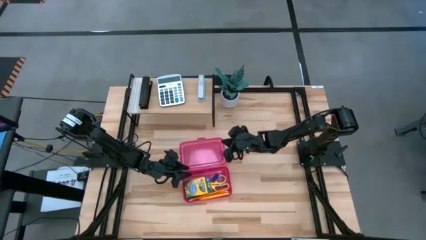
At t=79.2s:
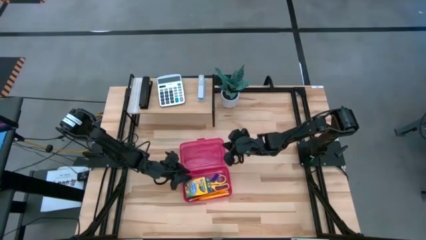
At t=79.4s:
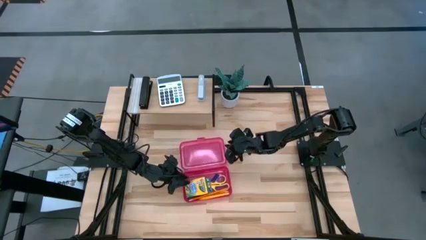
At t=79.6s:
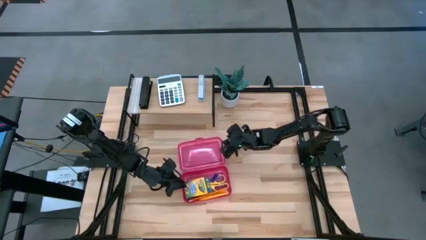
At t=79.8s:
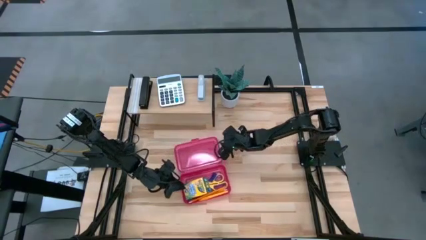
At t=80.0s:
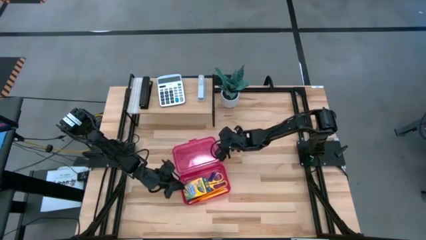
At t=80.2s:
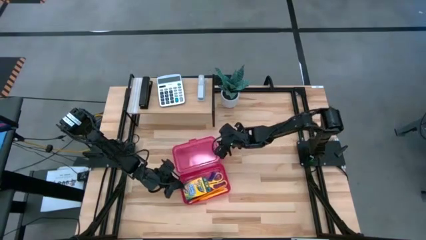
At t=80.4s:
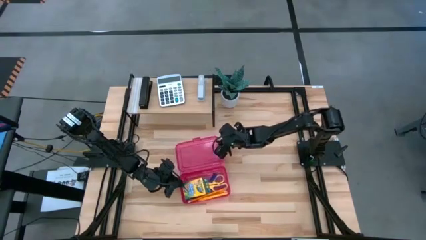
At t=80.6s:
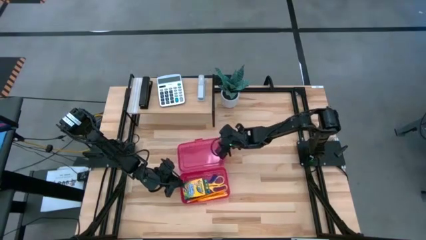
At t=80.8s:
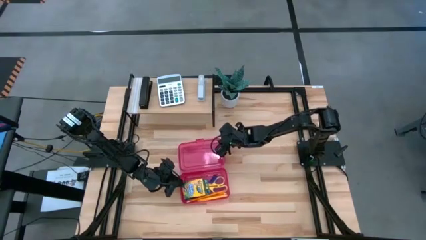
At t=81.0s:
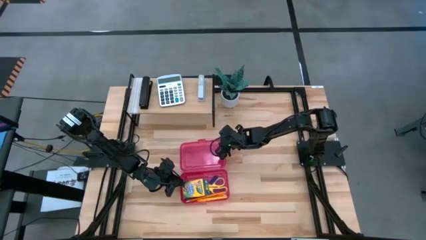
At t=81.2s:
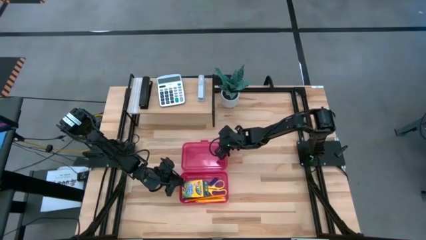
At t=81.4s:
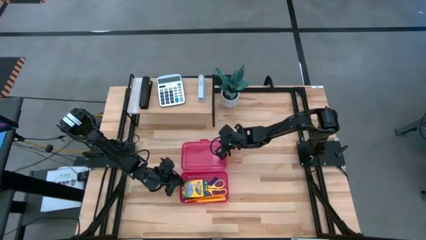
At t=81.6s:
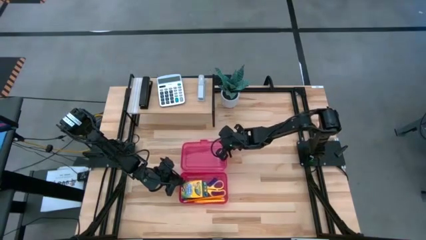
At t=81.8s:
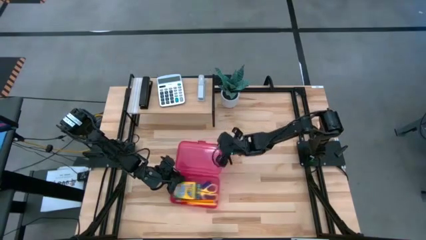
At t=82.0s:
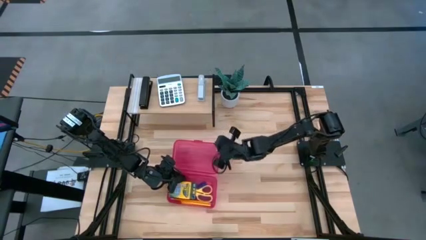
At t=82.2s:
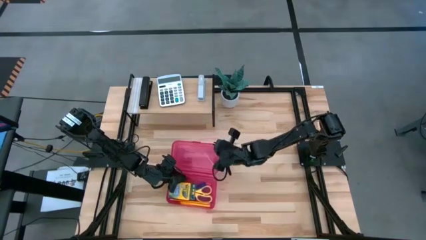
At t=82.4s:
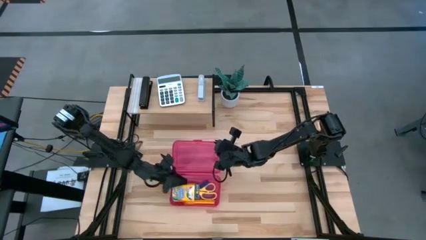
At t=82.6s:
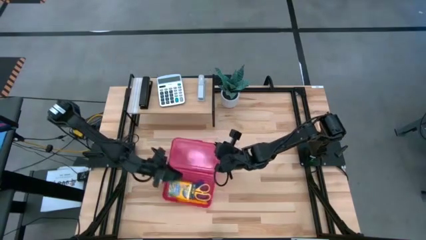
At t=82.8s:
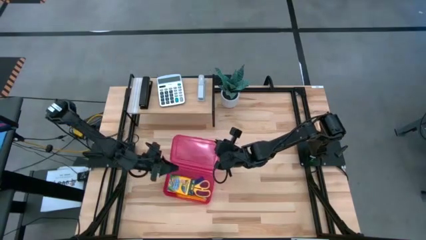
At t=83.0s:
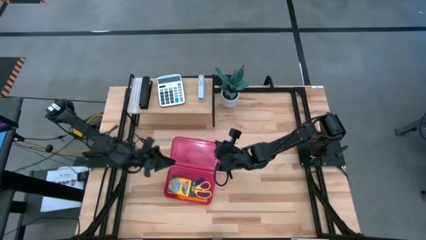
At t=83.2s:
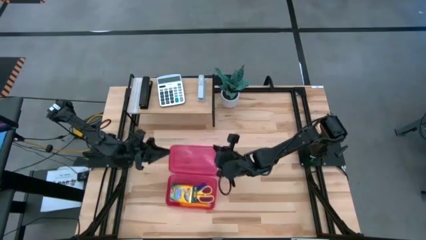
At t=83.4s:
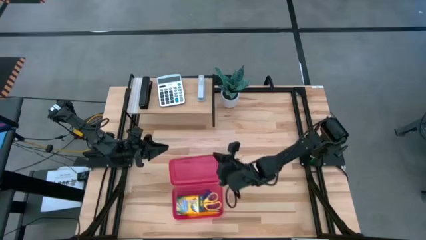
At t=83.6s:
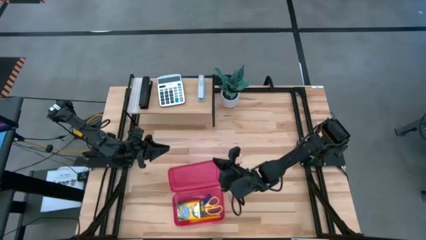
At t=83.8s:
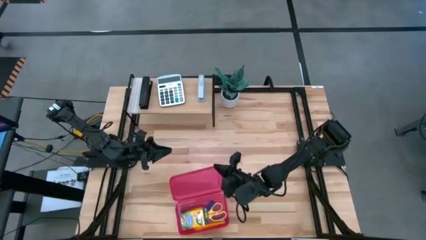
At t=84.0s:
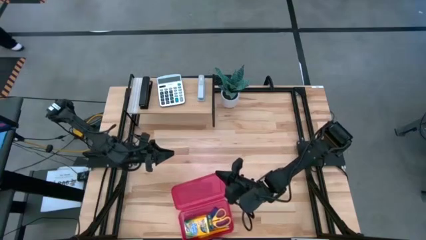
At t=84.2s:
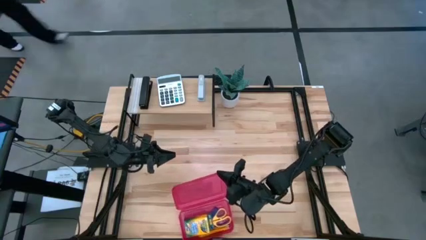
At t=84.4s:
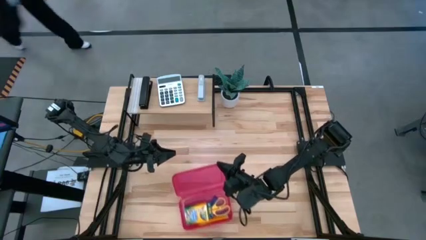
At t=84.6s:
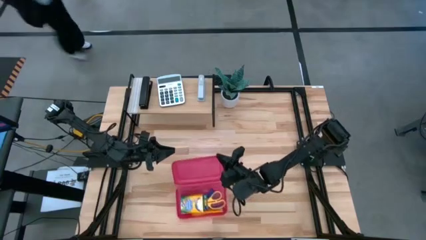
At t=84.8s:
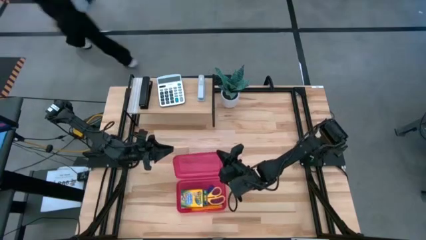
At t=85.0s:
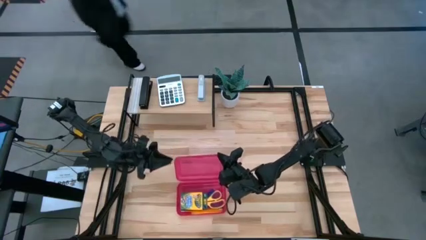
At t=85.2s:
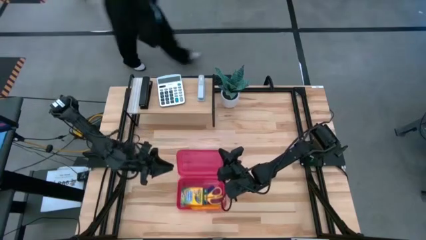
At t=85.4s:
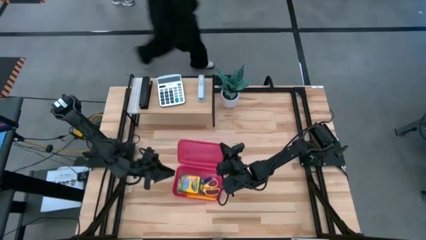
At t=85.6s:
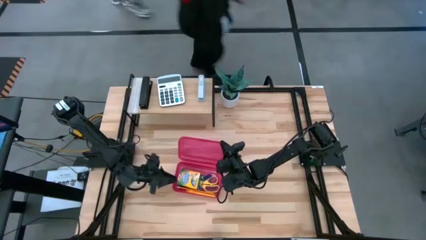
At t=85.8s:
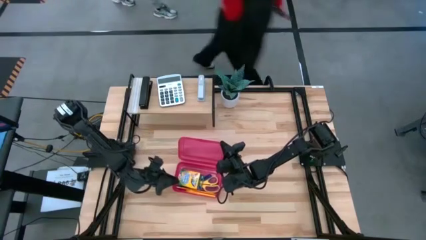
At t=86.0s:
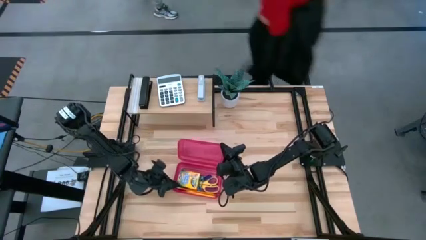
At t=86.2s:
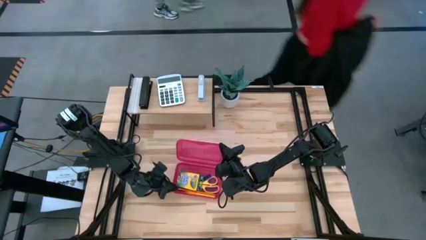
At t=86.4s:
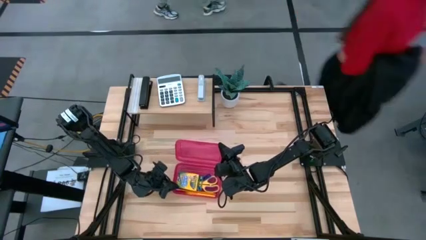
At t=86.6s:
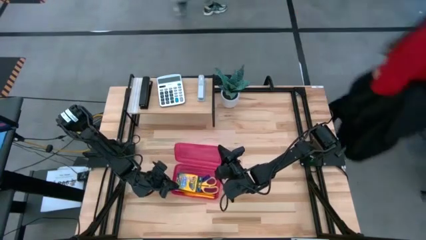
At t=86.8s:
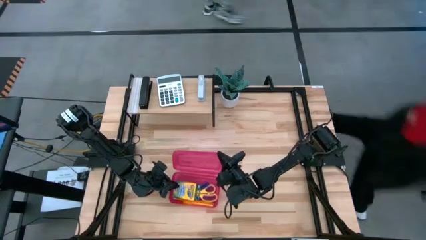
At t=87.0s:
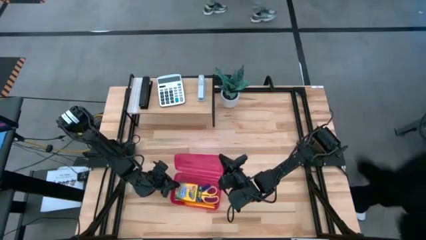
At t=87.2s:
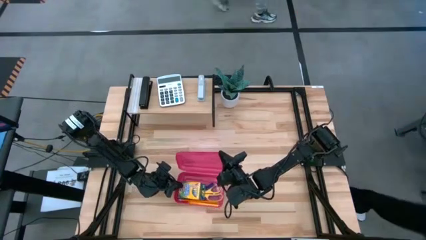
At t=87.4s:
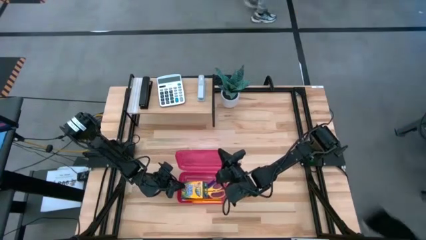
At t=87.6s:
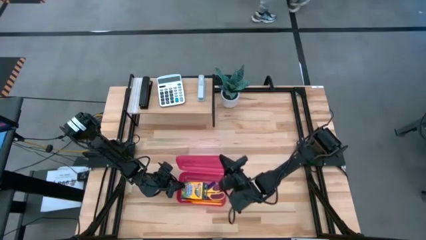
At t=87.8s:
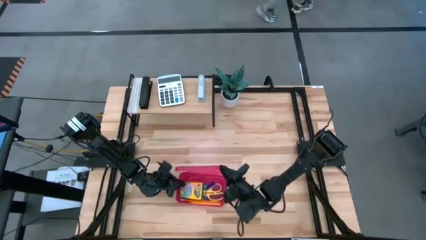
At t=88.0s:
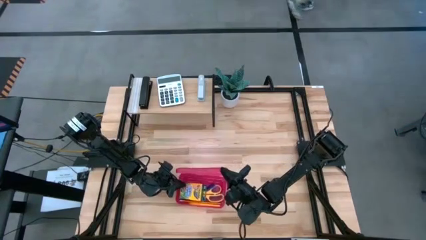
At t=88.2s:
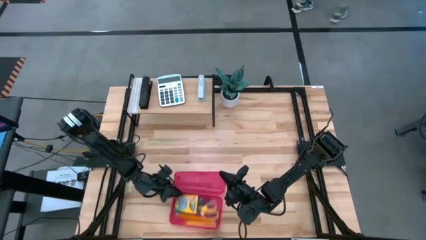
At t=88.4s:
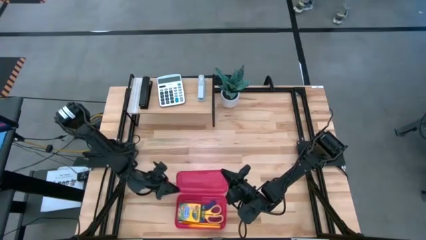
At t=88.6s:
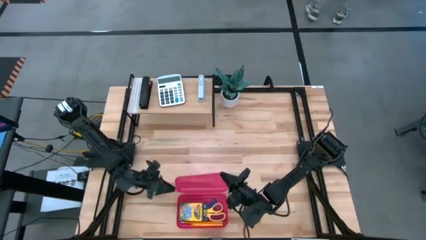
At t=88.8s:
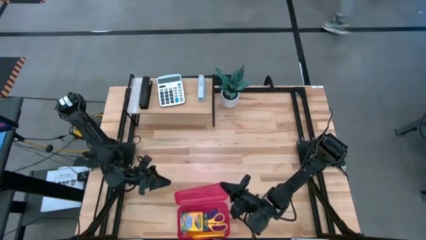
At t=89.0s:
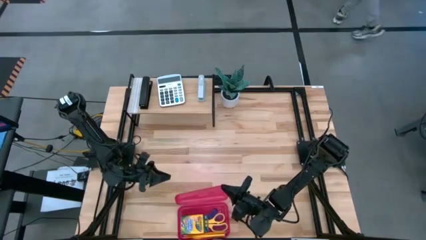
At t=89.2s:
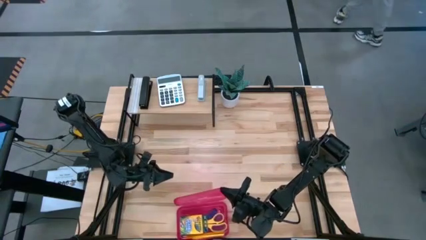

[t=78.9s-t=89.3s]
Task: Pack school essentials
Close the red supply box
